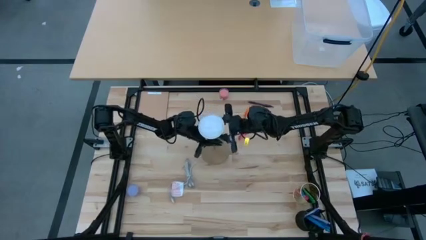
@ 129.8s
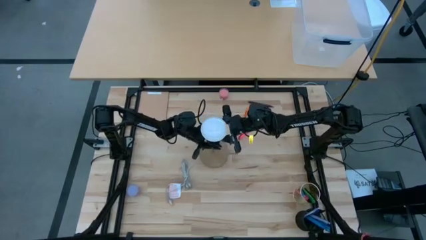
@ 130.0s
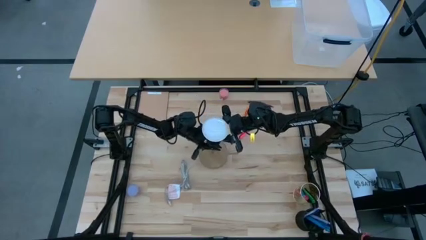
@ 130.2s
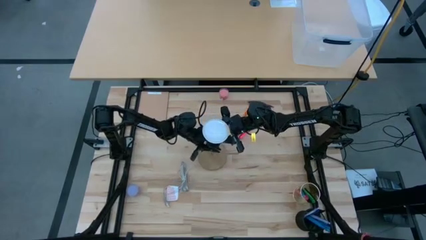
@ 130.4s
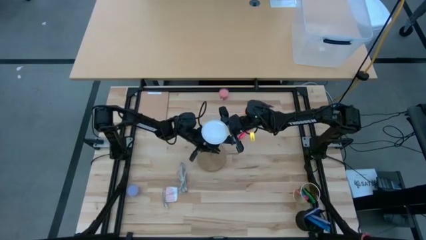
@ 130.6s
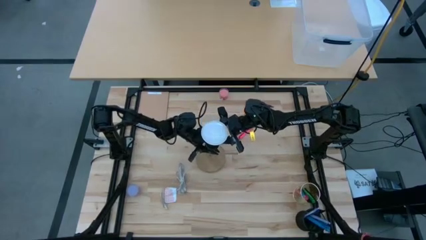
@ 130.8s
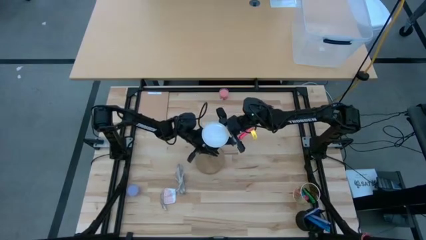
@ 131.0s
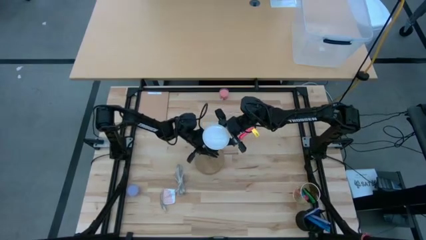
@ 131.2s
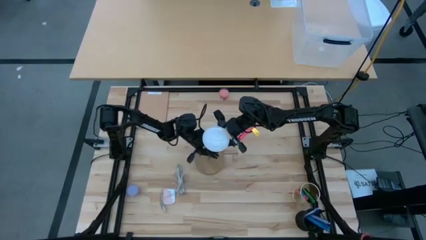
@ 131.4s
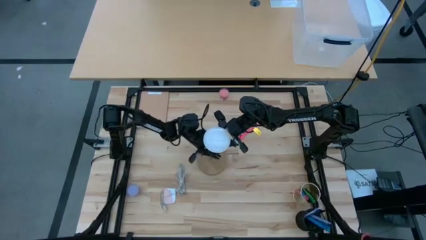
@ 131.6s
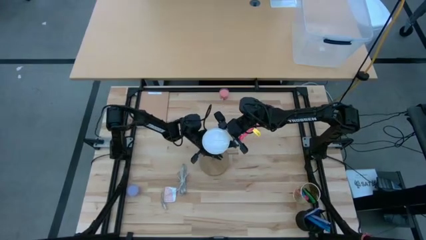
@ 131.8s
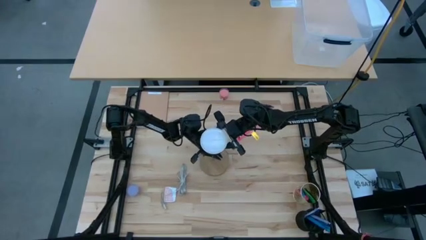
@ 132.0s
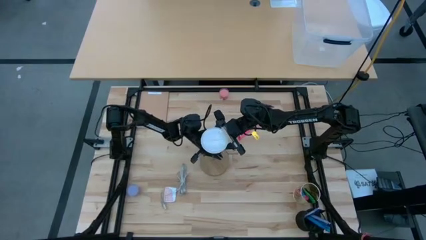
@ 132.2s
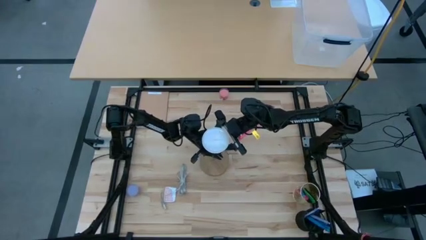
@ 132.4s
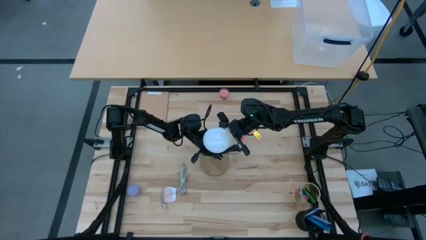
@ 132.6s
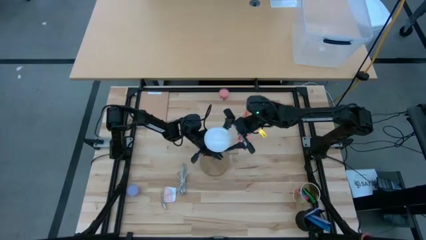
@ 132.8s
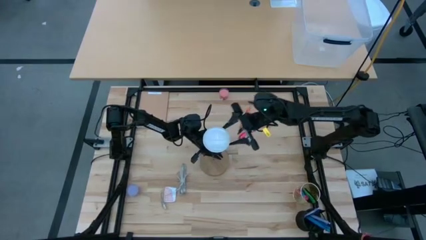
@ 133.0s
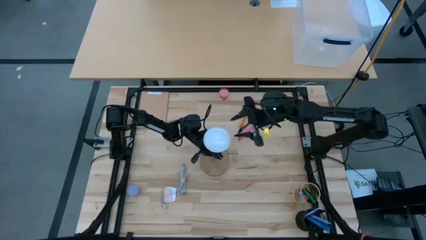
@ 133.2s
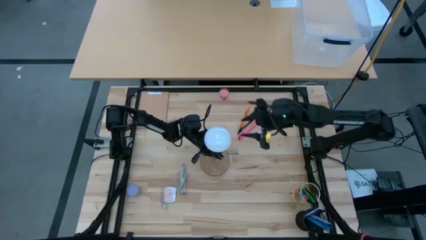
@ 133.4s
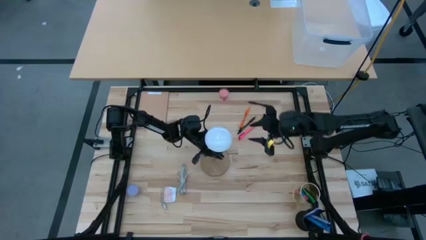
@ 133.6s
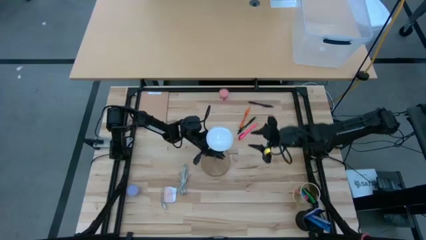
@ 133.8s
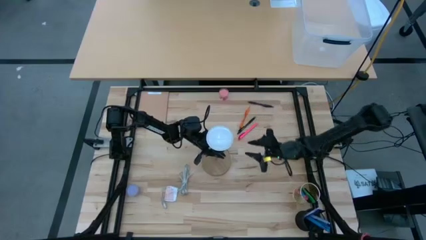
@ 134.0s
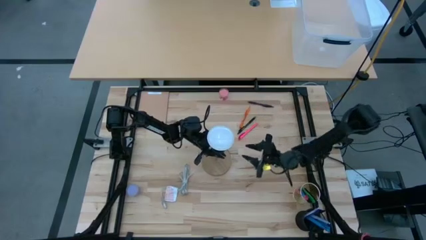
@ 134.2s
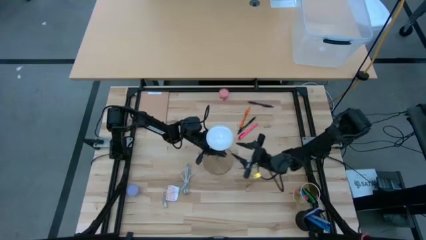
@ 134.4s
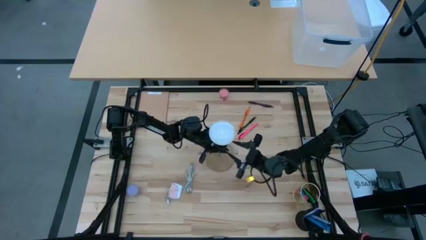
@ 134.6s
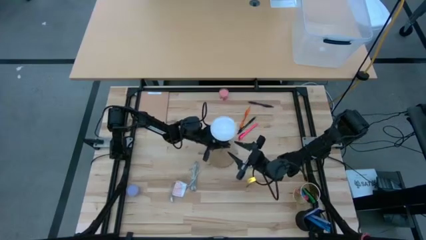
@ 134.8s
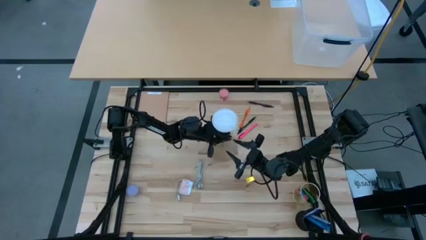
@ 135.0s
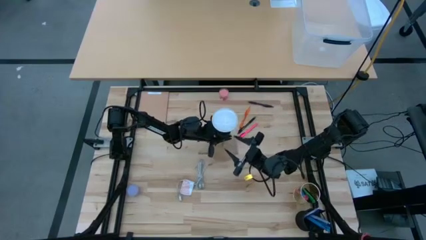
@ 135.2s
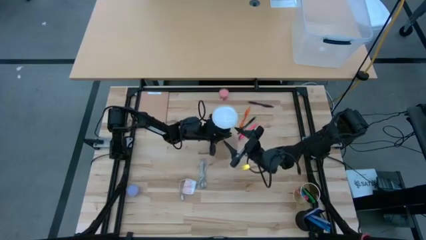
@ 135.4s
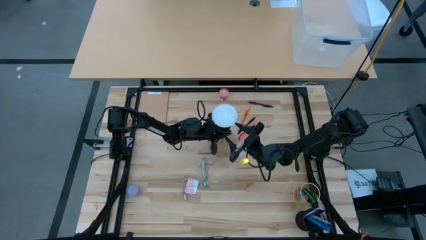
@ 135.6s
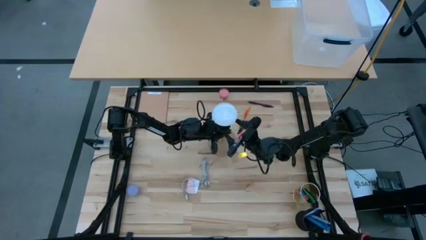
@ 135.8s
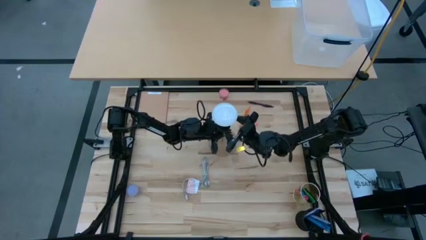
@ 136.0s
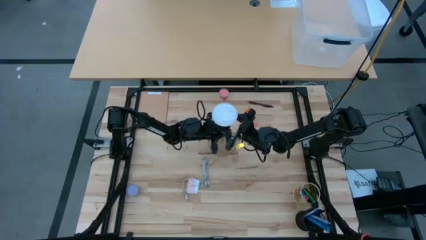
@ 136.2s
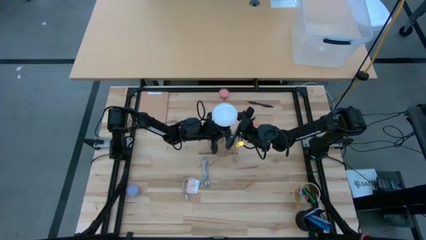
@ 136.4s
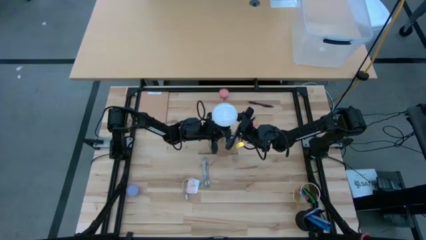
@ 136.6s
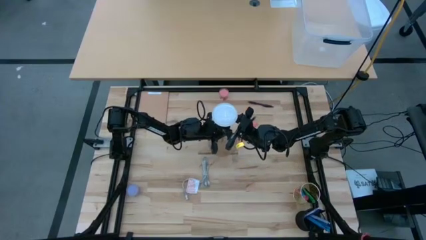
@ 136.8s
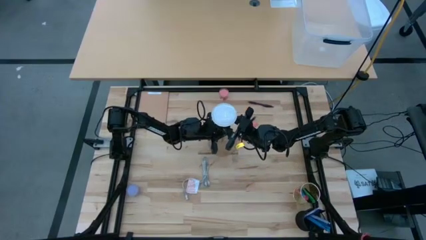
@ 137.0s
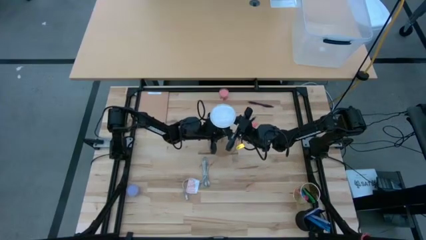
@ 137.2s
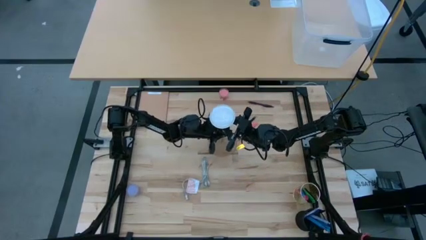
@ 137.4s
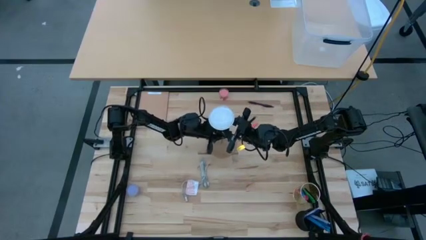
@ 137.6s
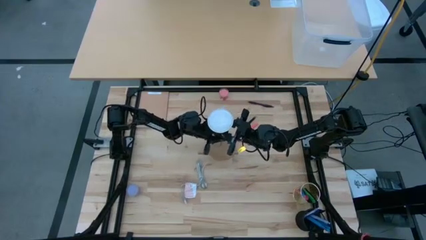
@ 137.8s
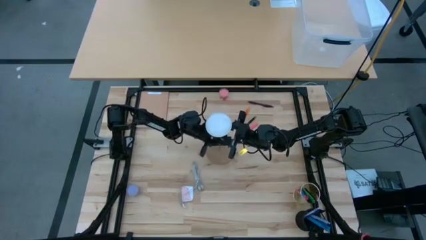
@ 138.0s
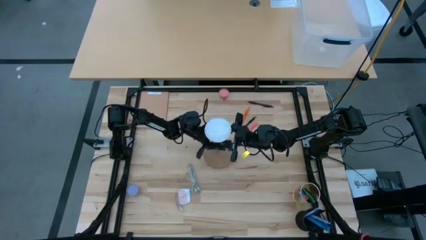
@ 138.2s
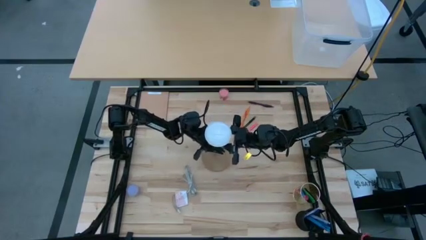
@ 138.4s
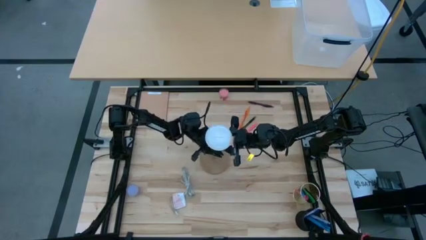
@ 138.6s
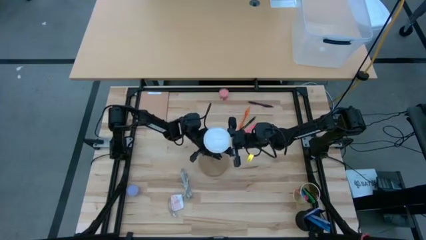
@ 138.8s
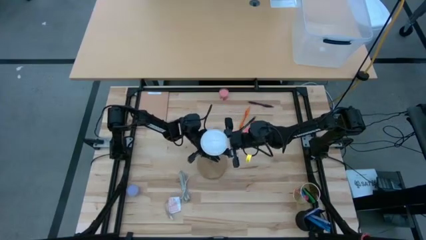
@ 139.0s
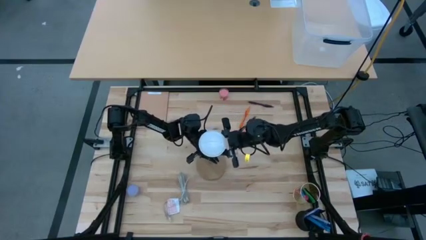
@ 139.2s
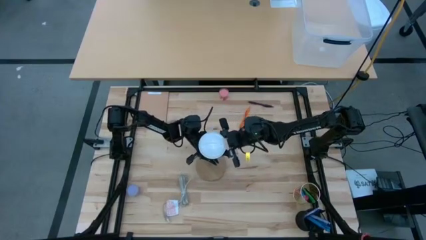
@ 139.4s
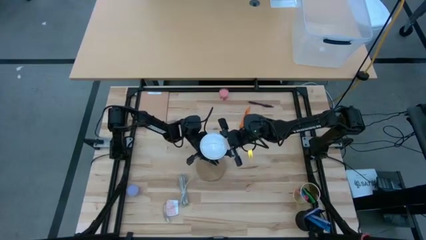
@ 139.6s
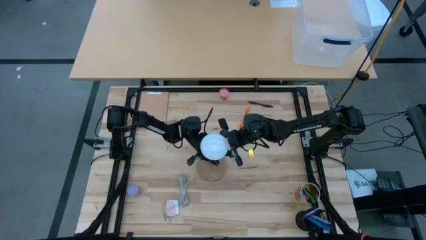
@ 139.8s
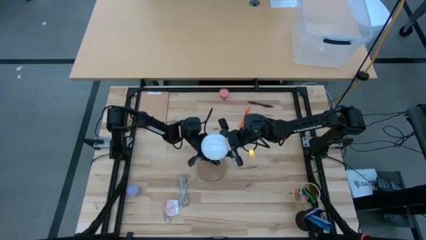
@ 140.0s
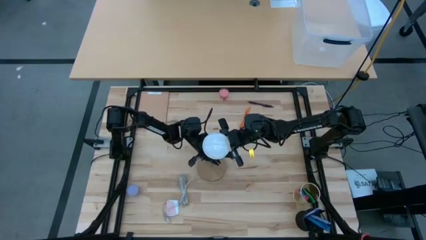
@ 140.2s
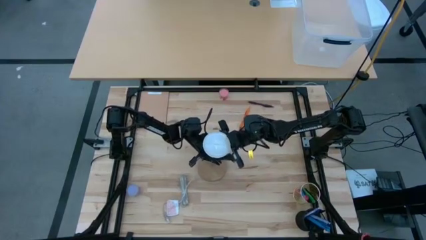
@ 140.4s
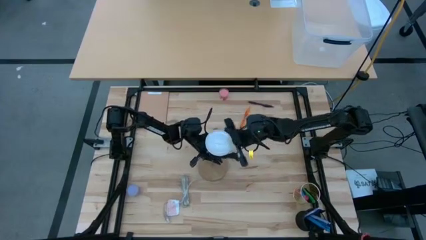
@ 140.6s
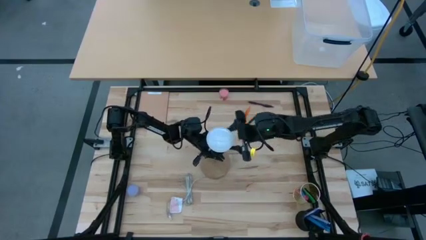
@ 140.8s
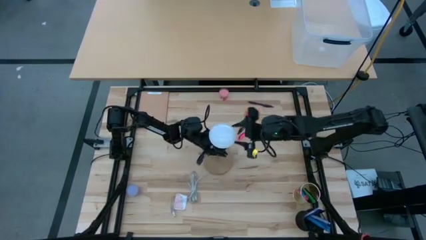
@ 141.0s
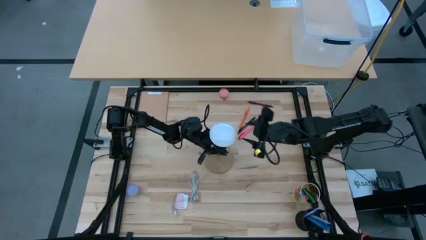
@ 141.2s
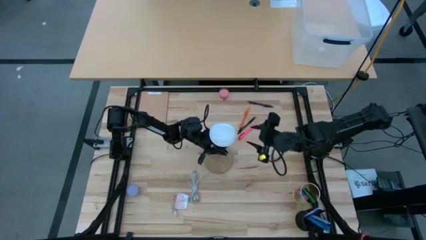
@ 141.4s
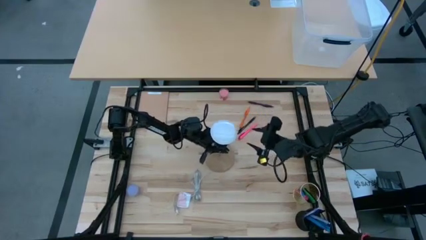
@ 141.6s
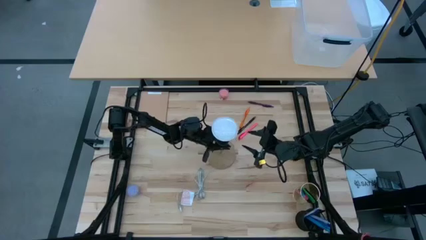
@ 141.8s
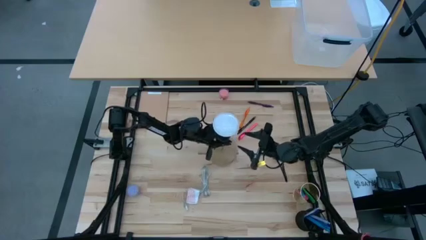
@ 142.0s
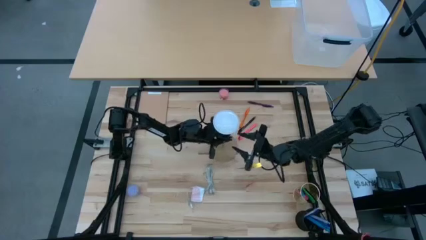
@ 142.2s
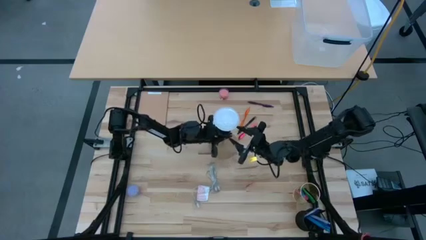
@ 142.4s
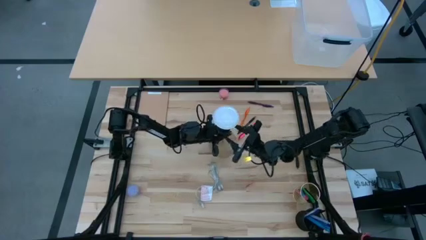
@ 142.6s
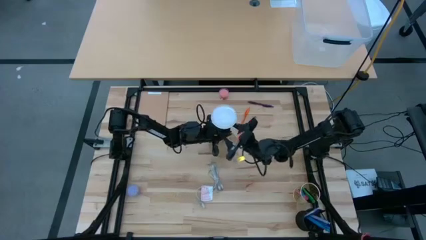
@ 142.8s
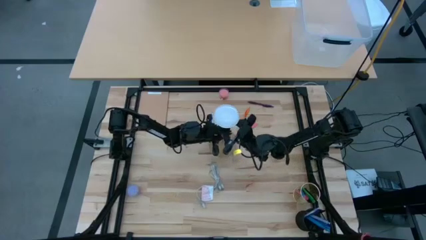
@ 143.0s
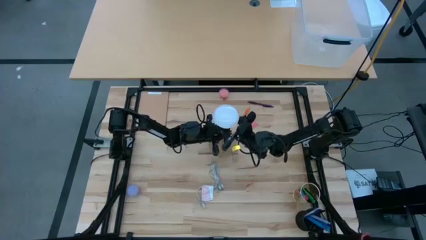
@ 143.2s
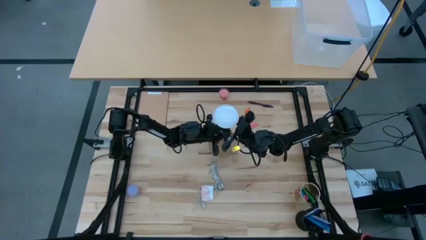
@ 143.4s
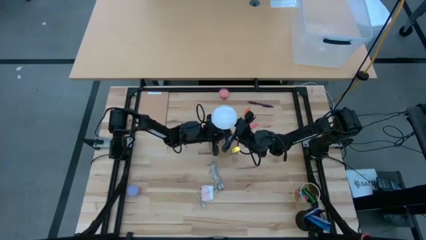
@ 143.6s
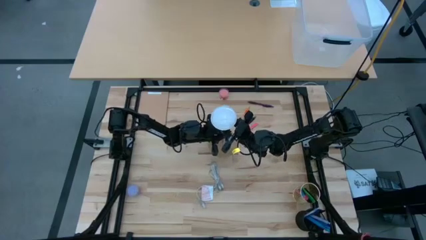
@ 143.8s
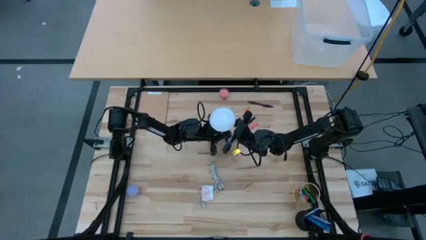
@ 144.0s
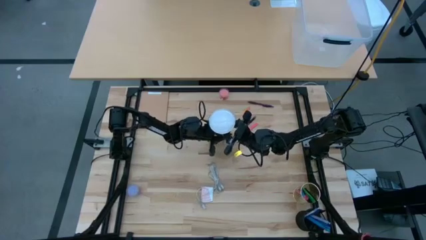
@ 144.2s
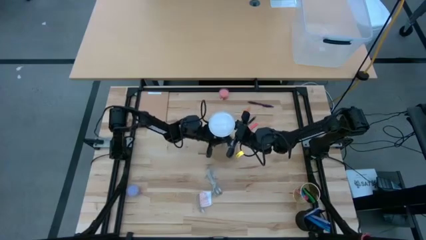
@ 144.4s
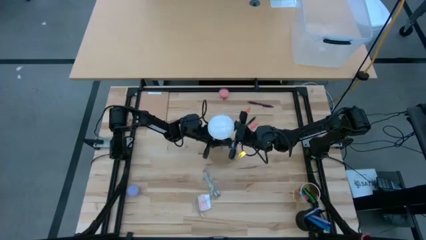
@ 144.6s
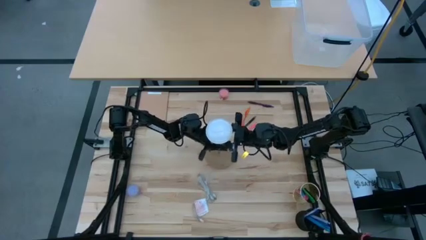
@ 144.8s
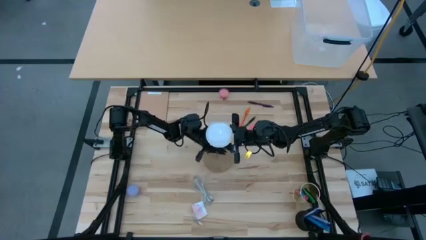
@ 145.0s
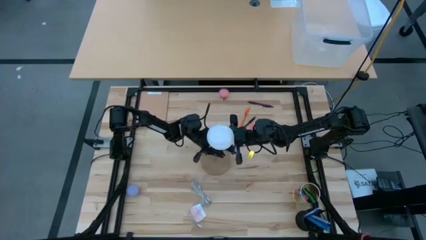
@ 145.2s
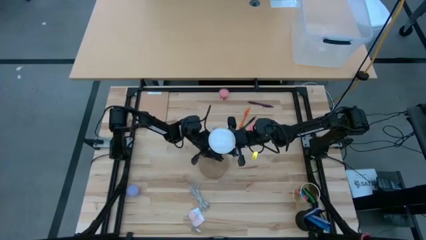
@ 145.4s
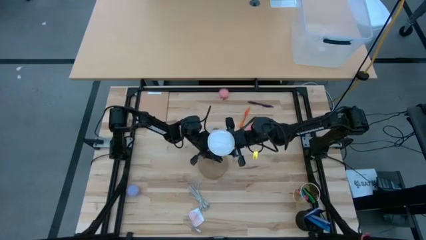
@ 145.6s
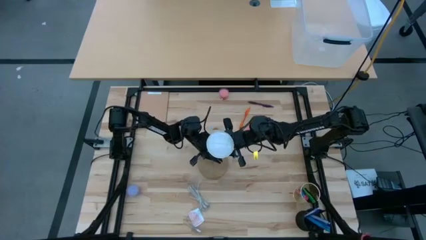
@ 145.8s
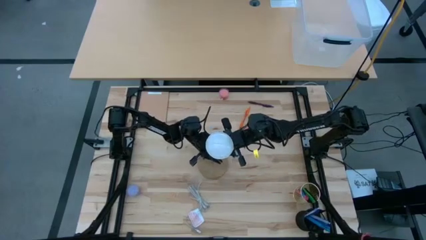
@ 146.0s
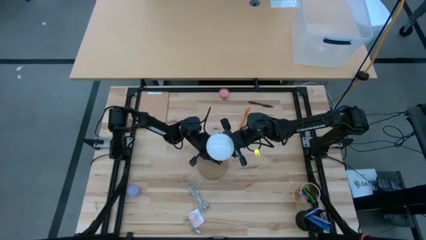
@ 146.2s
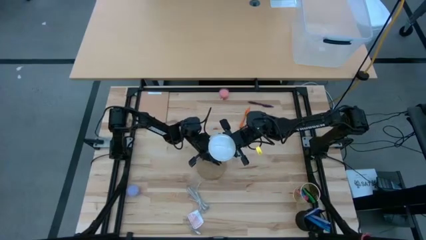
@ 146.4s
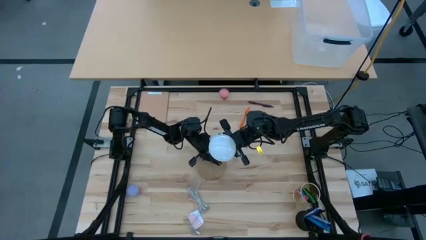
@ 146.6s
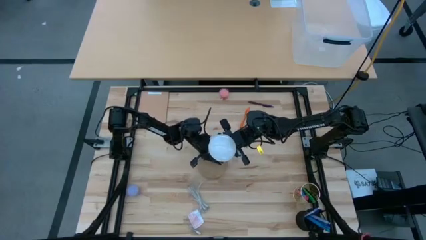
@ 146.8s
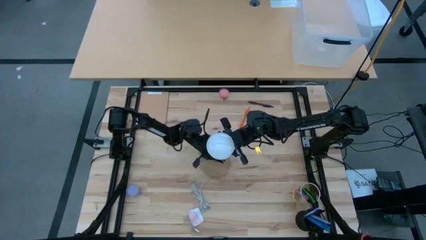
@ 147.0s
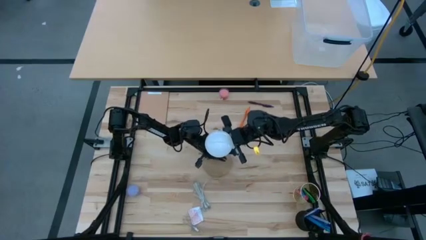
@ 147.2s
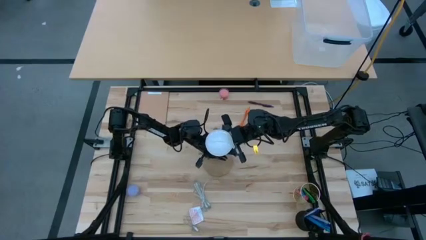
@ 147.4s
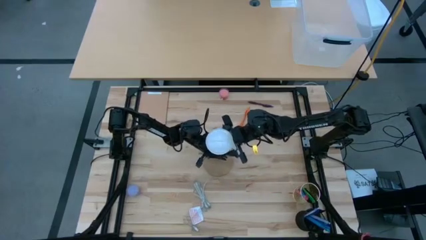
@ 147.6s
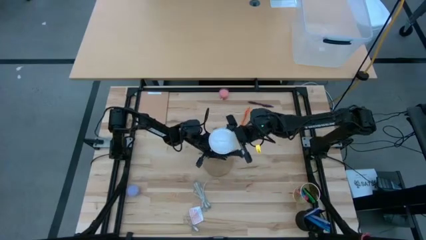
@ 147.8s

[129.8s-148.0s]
Task: Screw lightbulb
Remove the white lightbulb from the desk lamp
